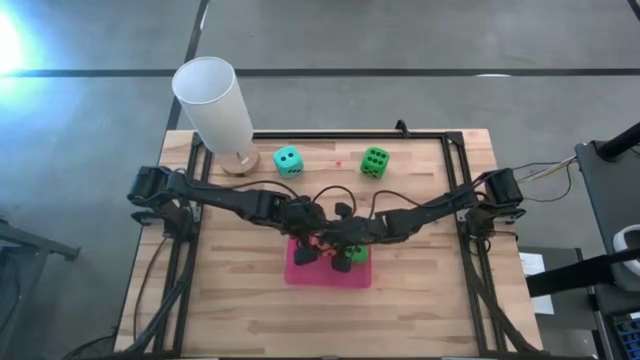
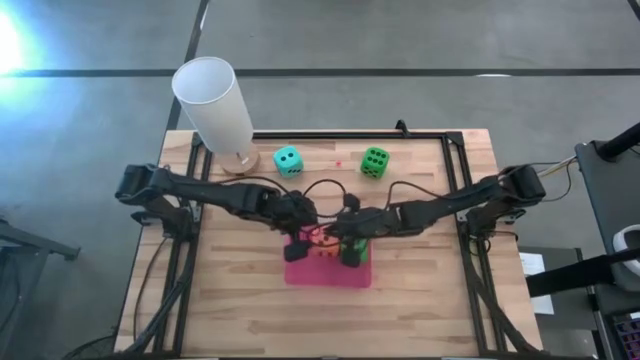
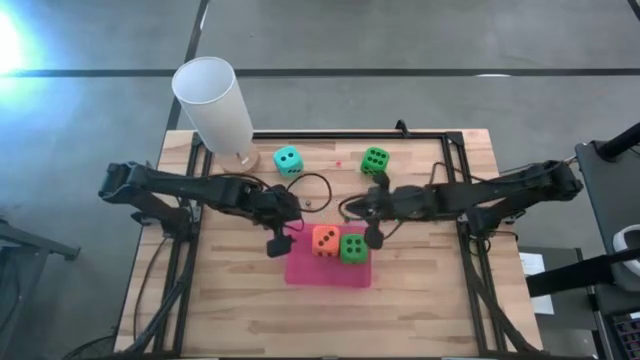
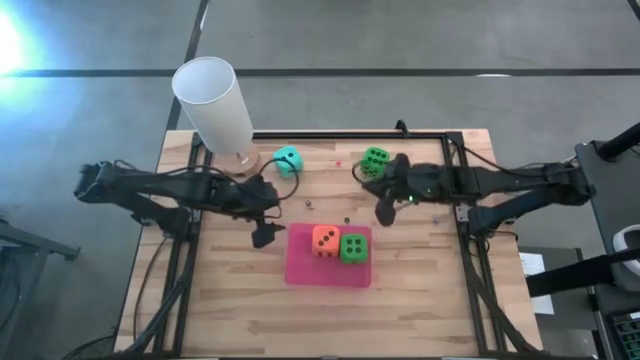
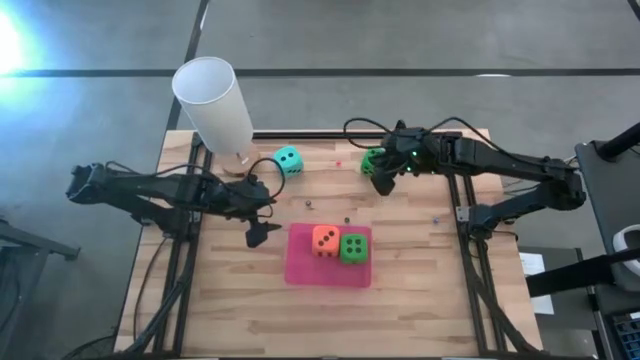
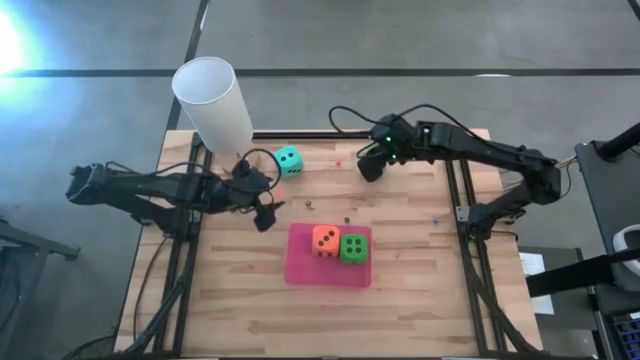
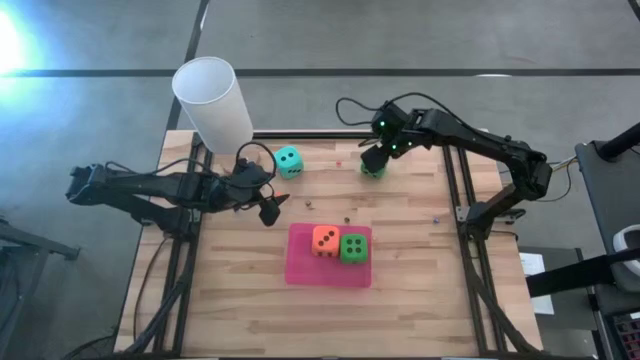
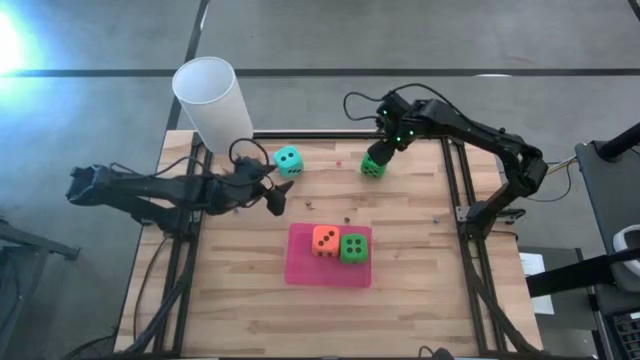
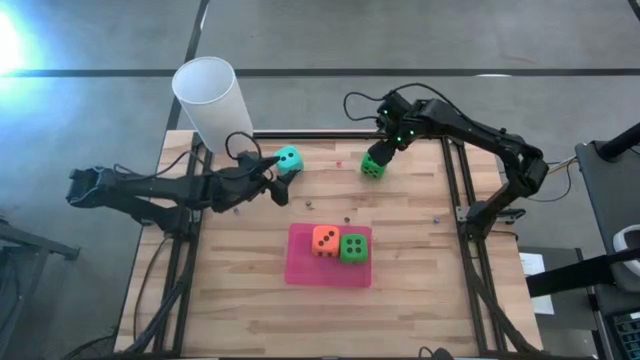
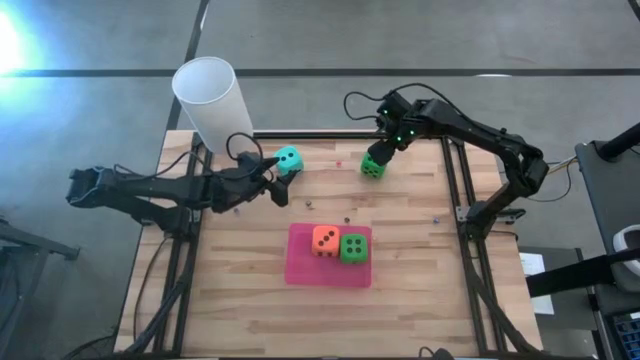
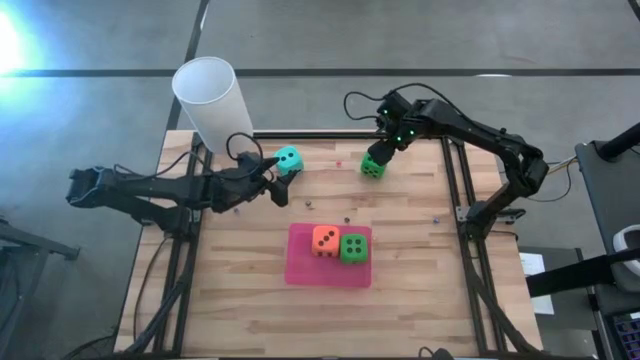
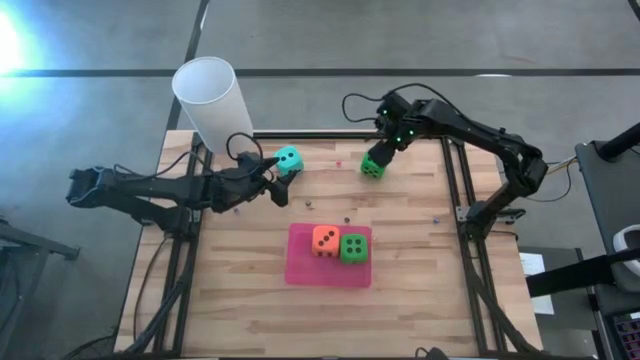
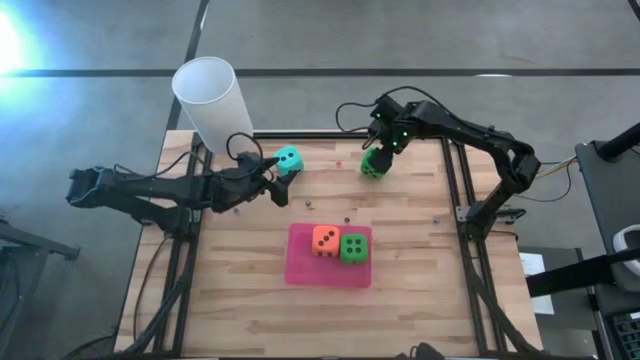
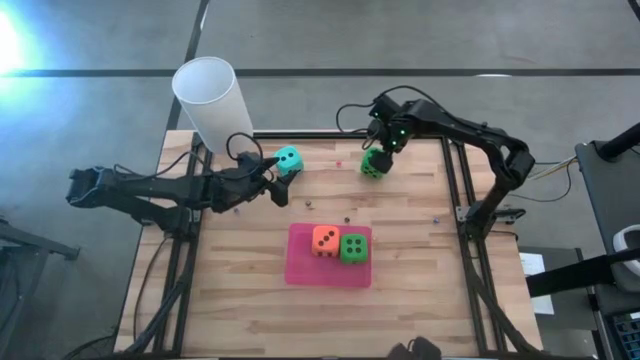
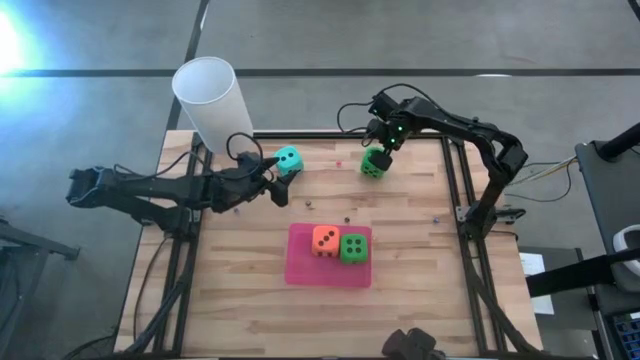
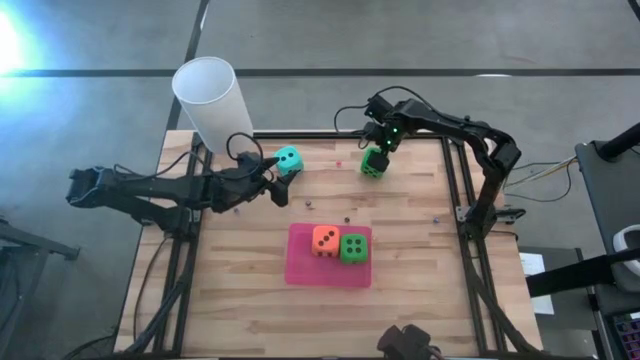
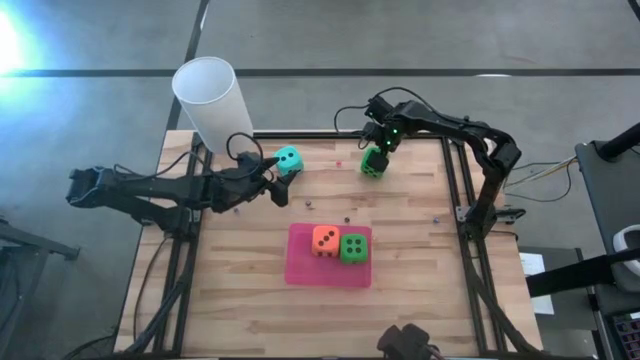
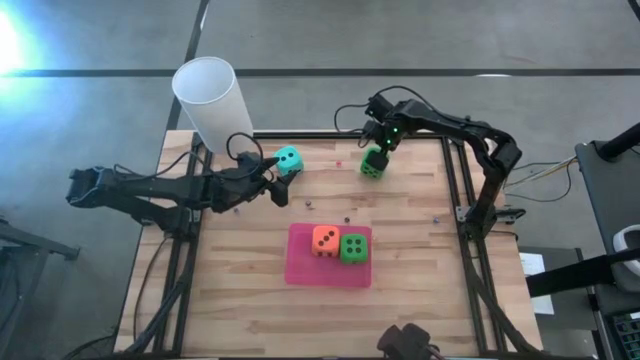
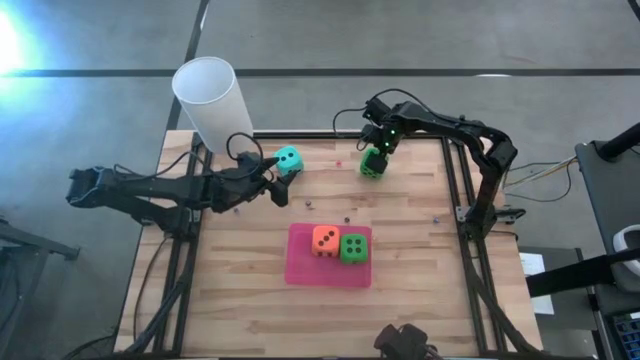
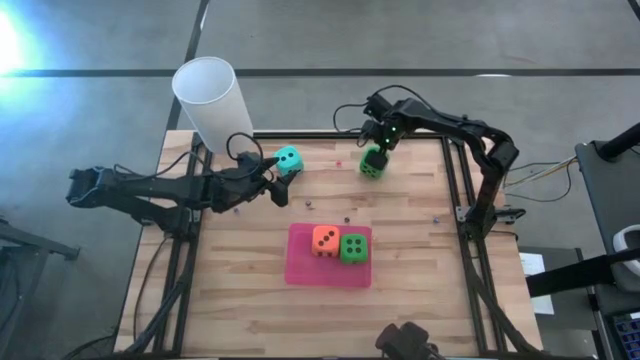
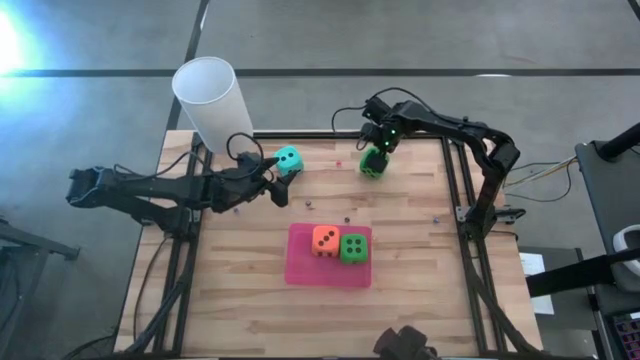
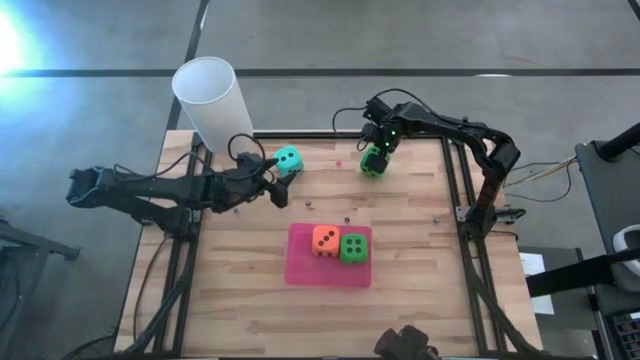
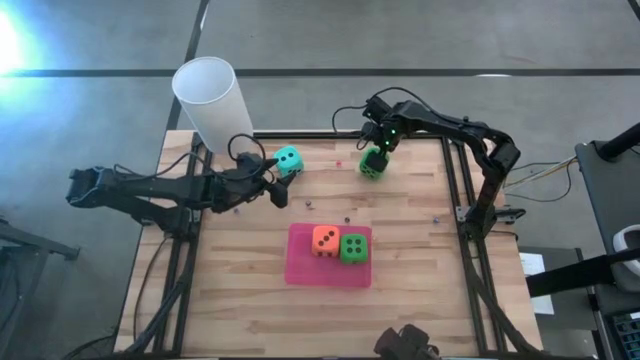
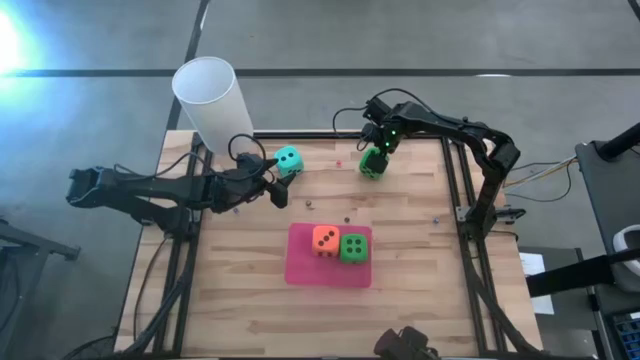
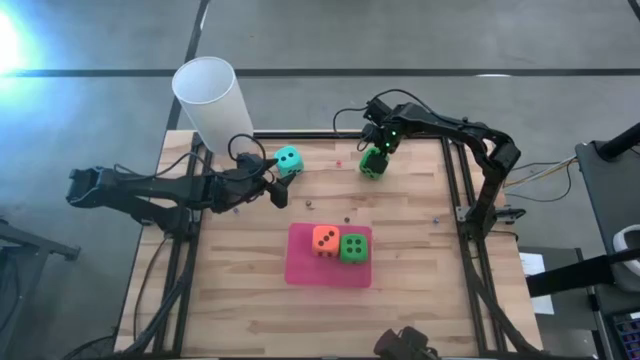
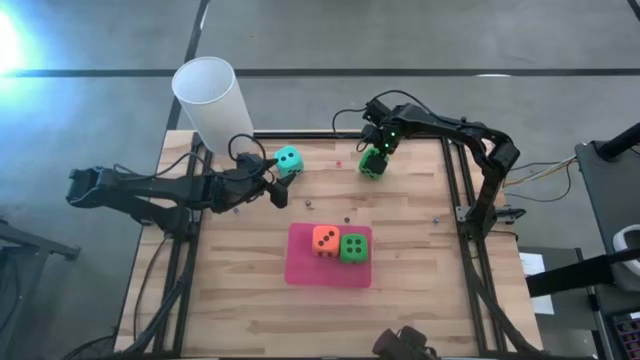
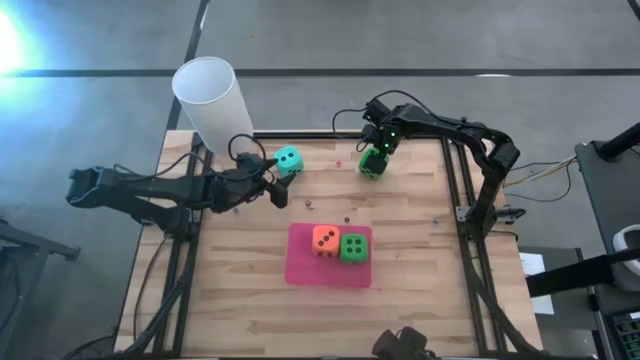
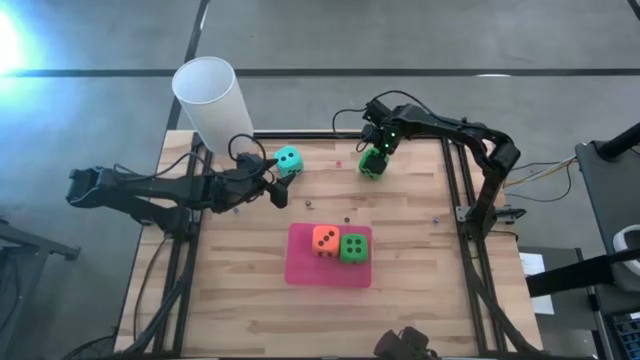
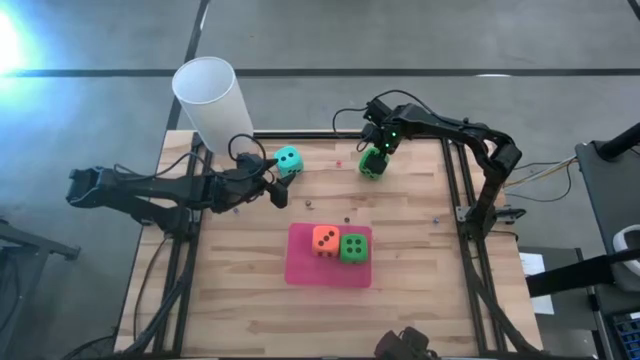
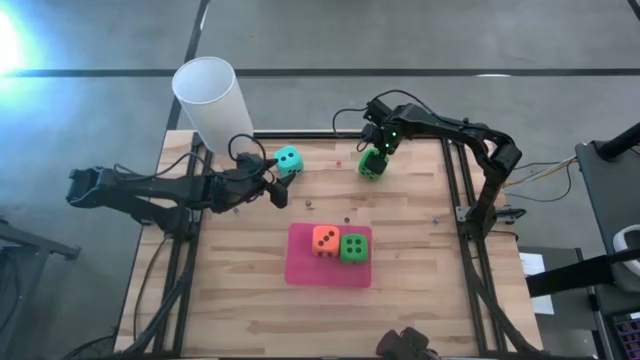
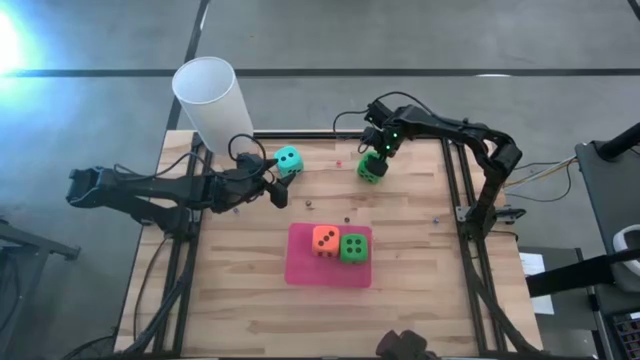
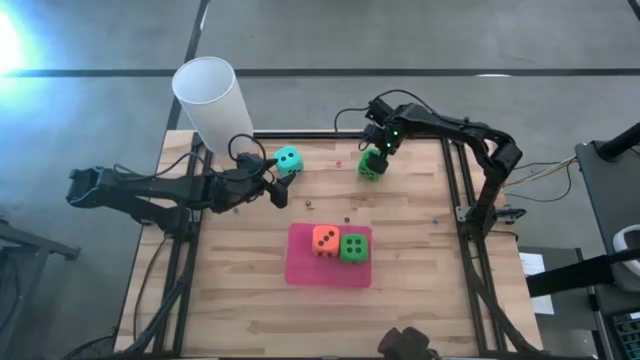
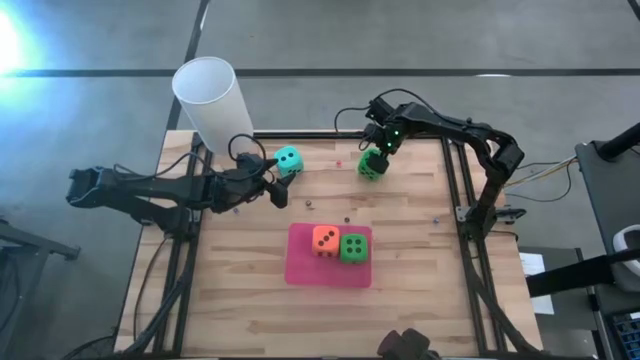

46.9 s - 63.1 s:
Task: Pick & Place Dice
Put the large green dice into the pink bin

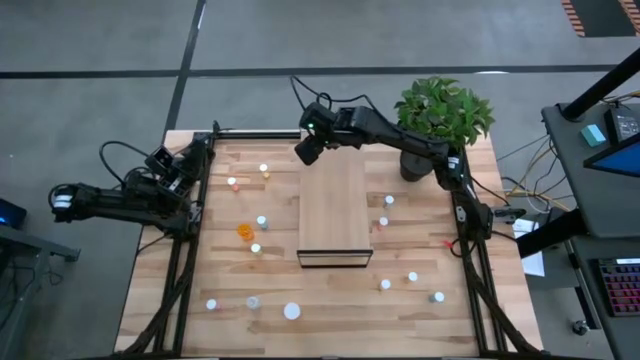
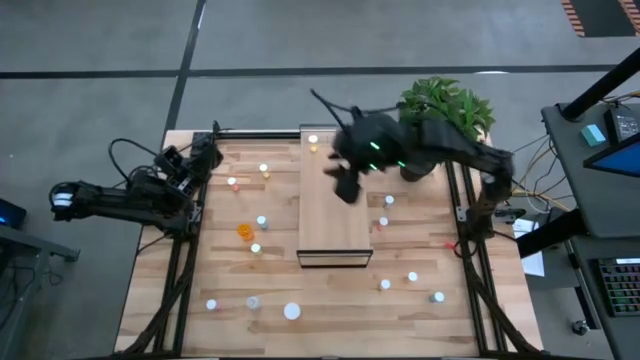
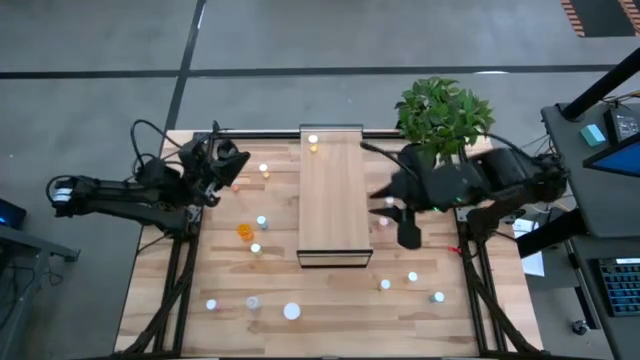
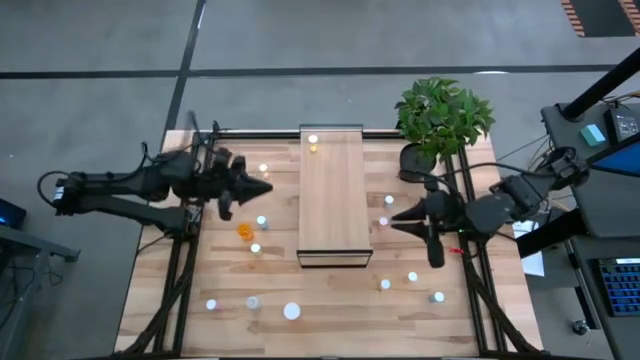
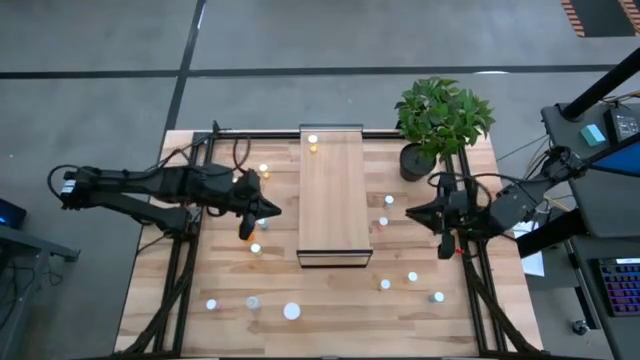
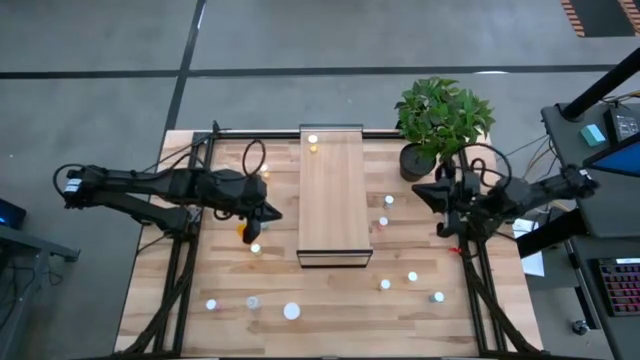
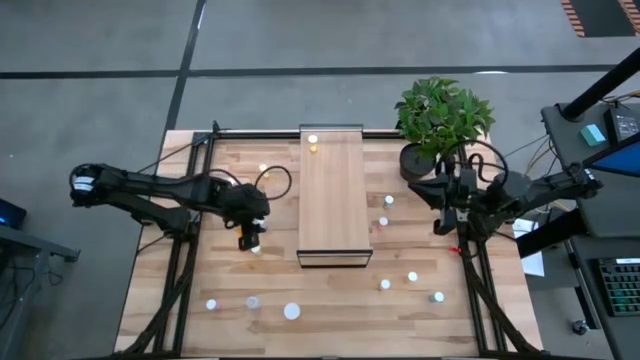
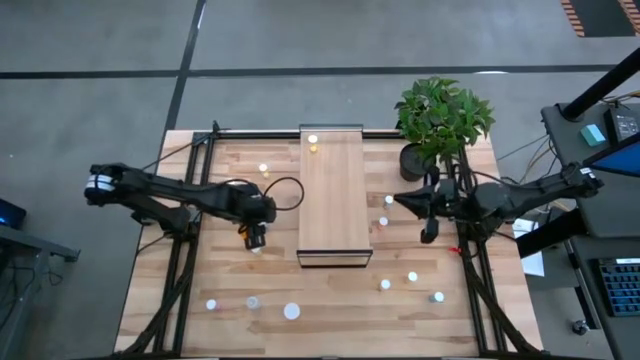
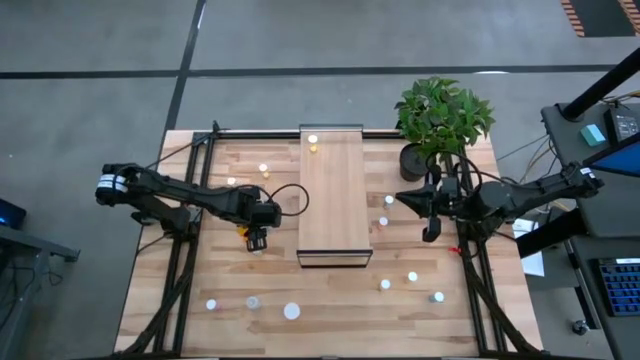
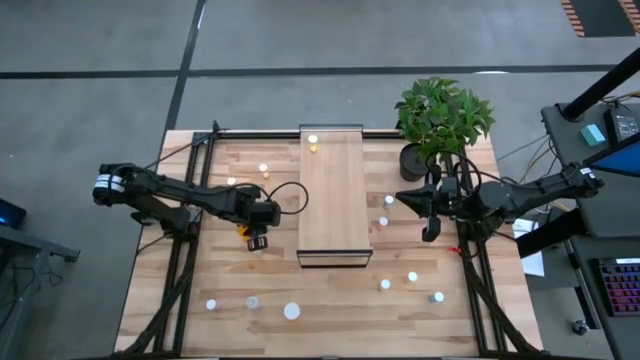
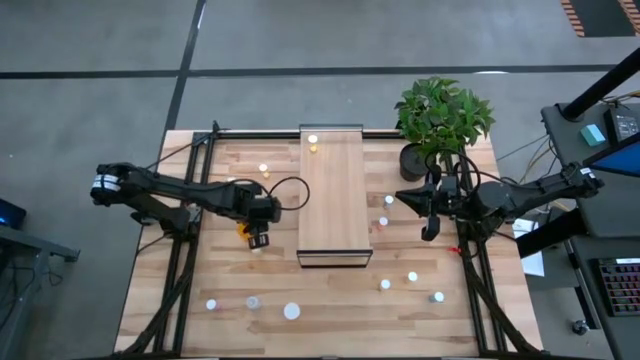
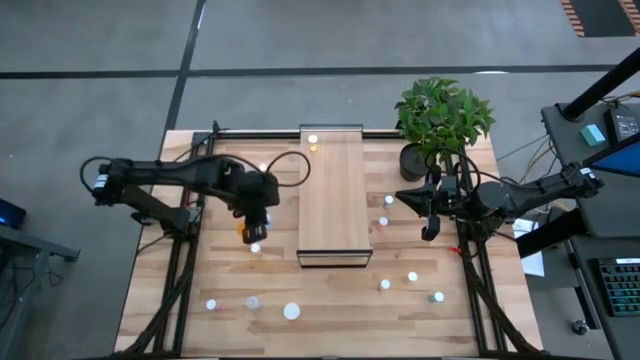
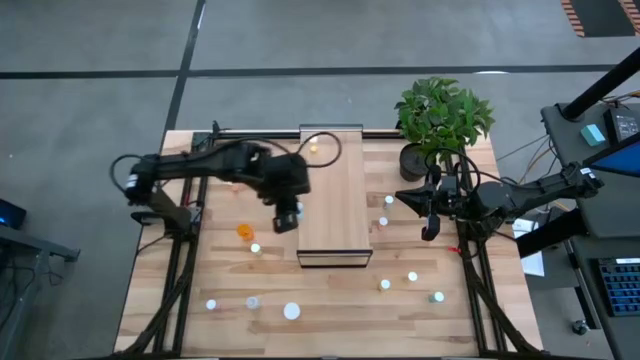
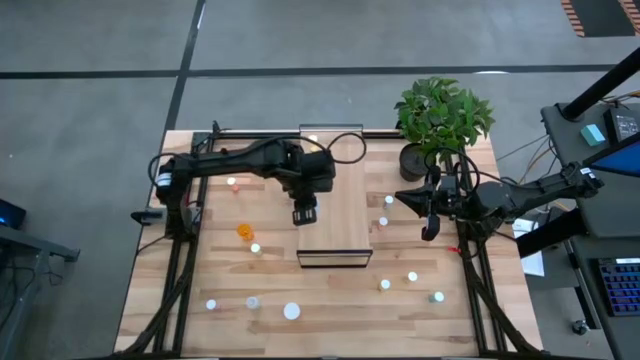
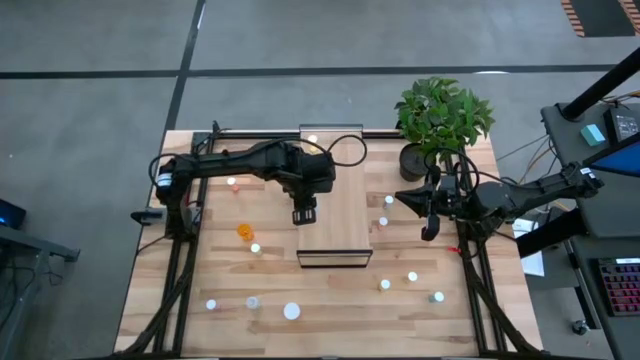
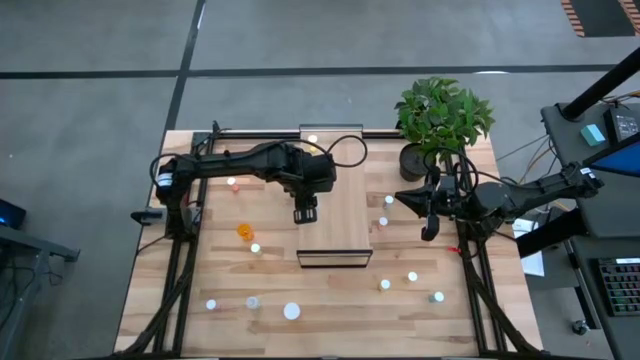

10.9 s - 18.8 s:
Task: Pick and place medicine bottles onto shelf by color
Put the top left blue bottle on the shelf
